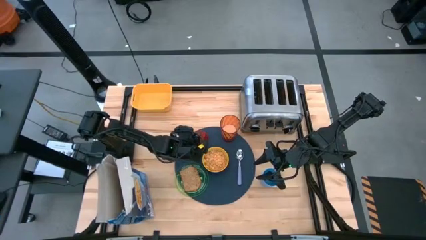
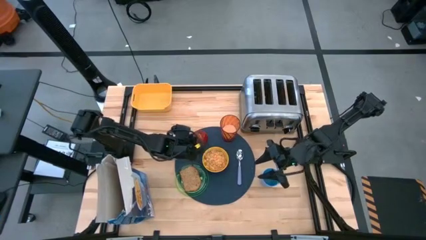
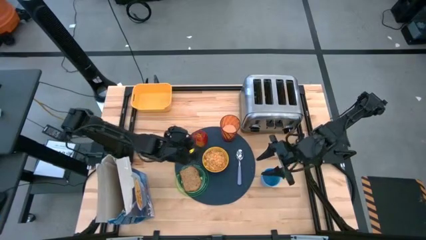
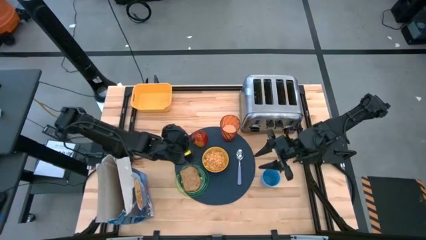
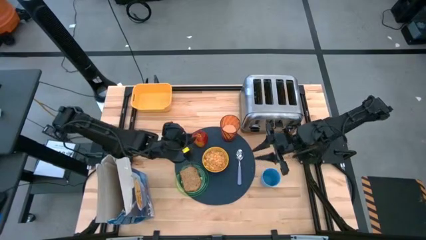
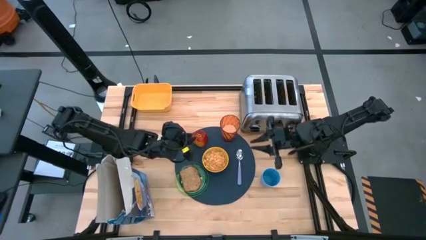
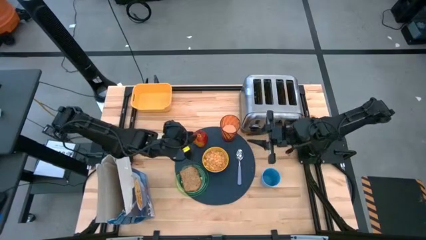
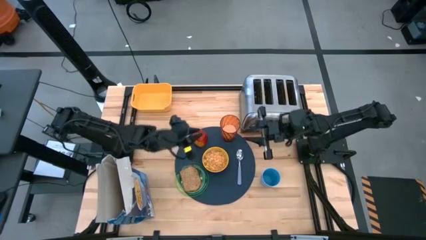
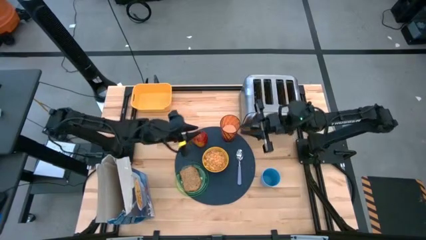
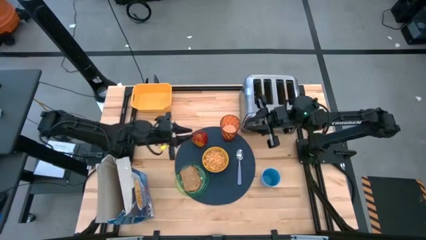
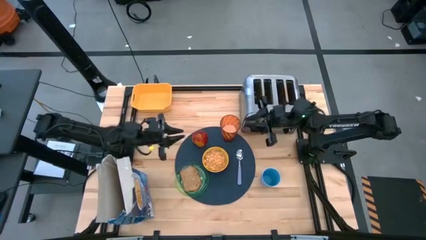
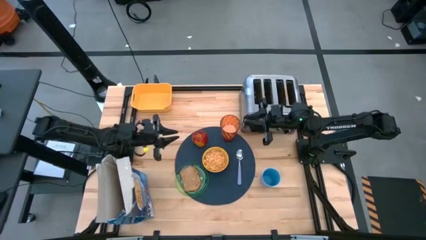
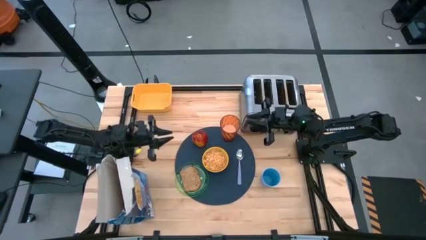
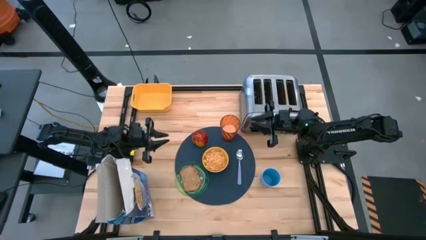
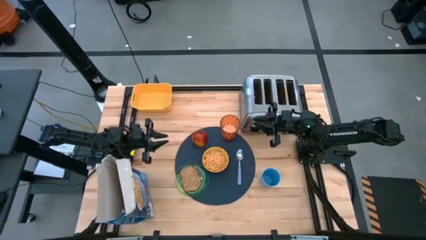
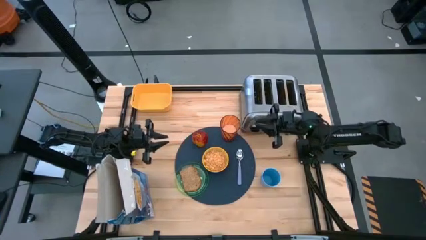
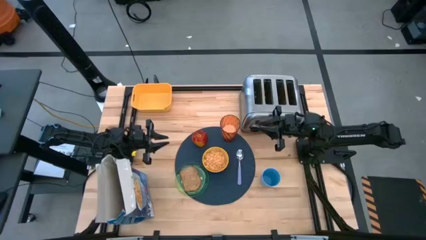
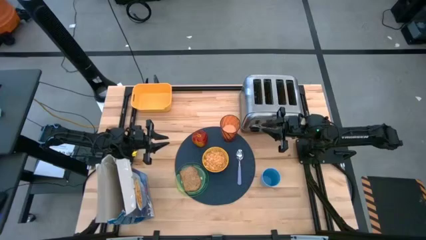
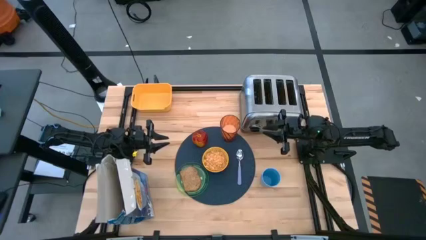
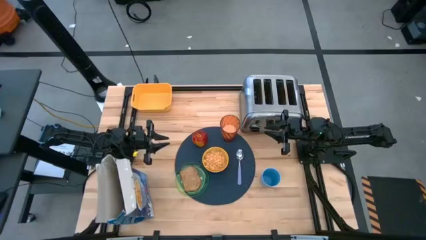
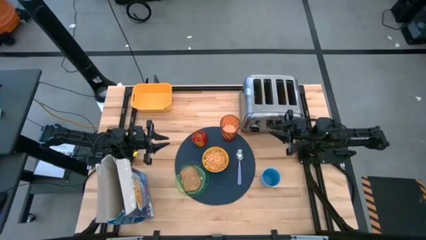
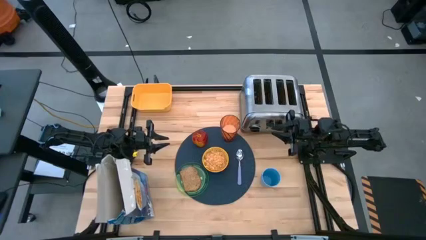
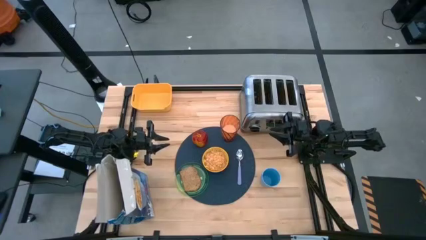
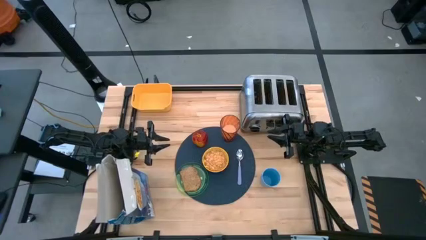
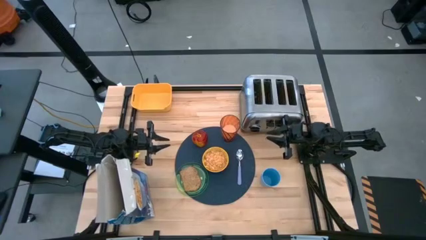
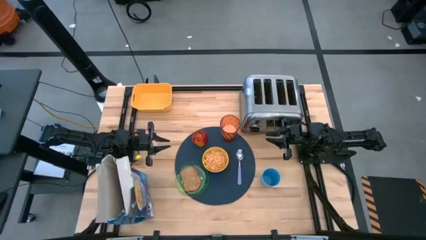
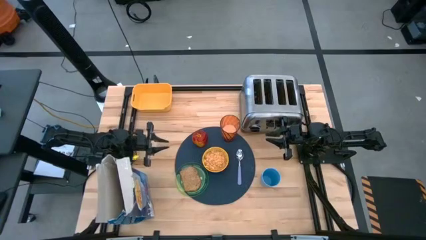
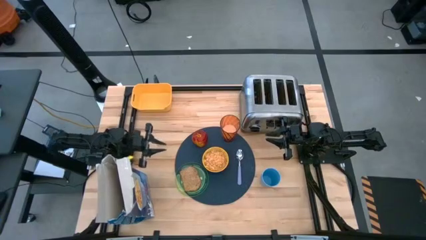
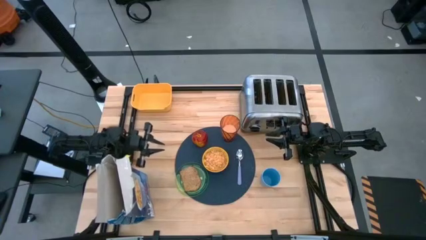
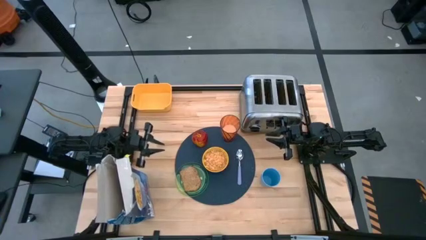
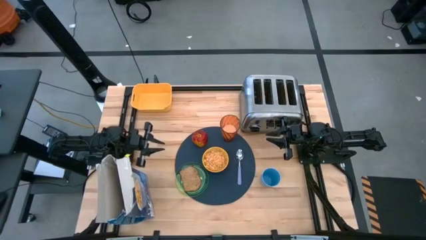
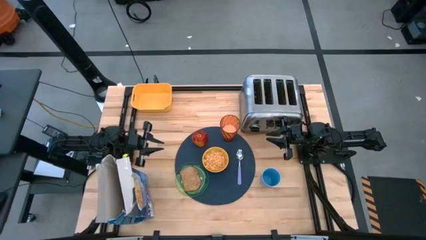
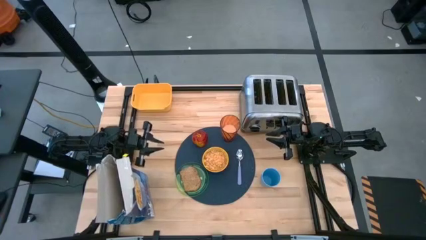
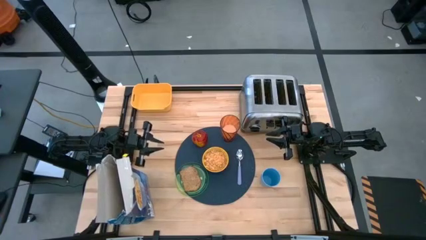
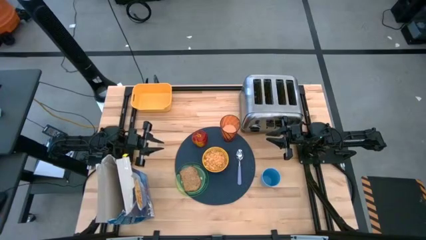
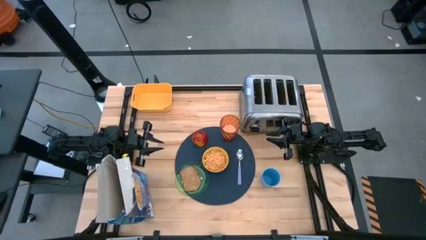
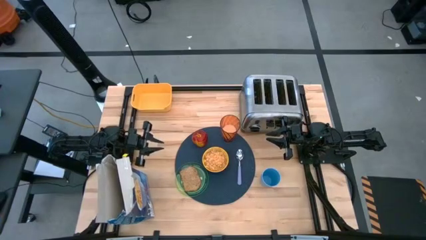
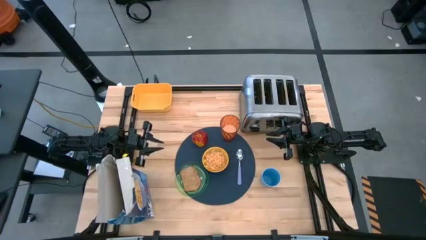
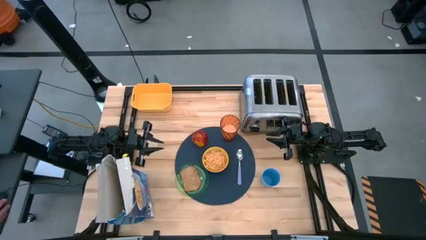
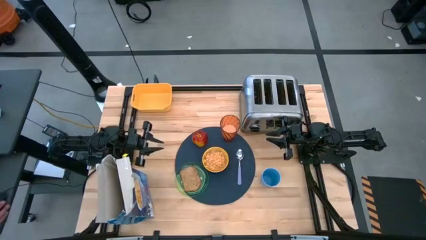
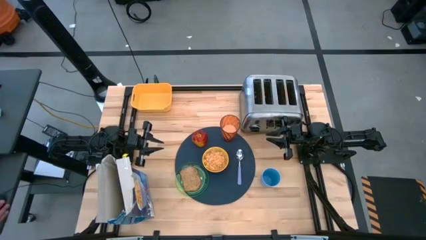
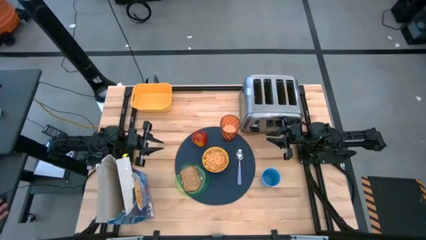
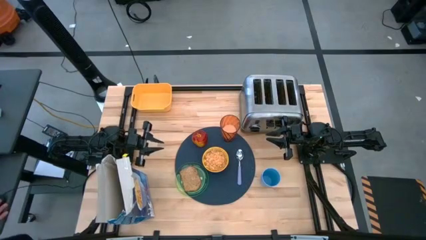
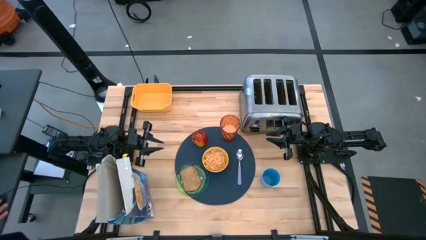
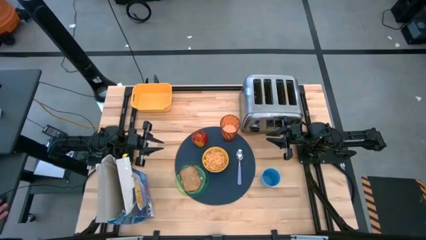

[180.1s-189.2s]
Task: Arrange a breakfast setting
Return to Home Position

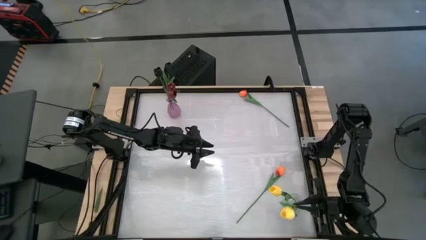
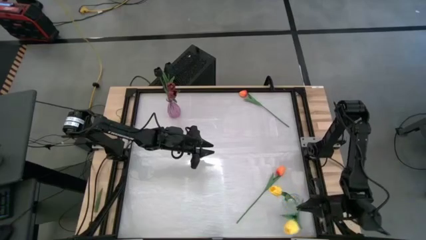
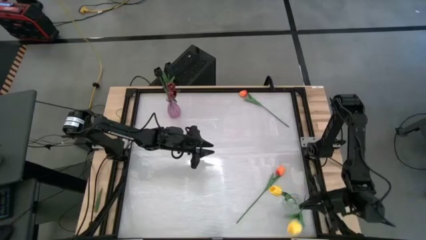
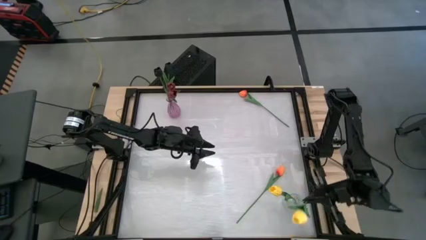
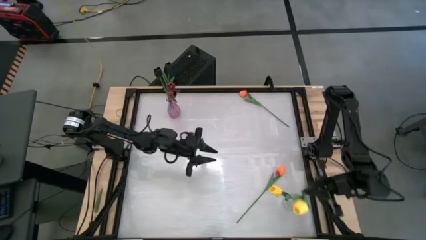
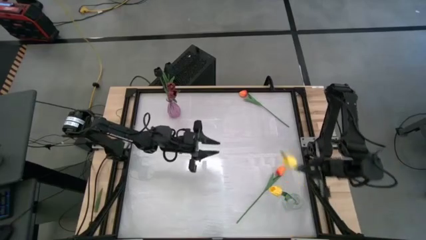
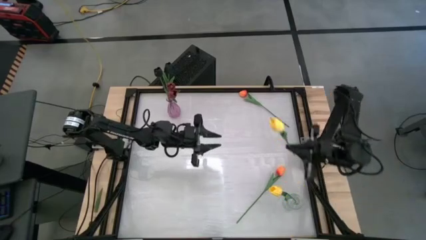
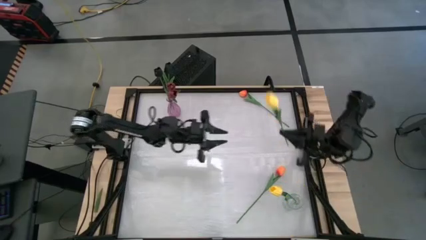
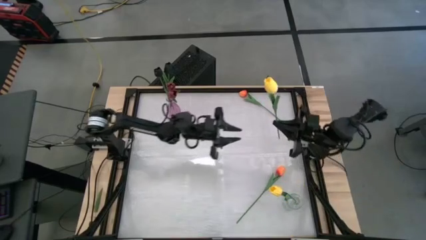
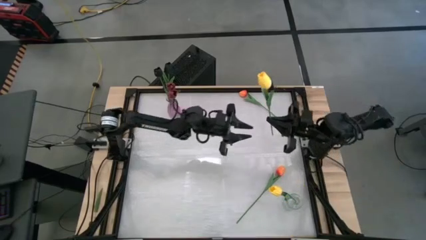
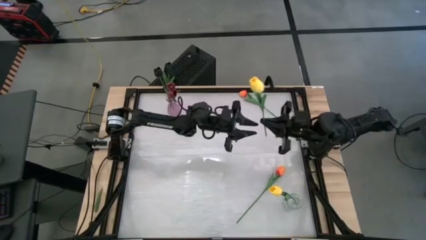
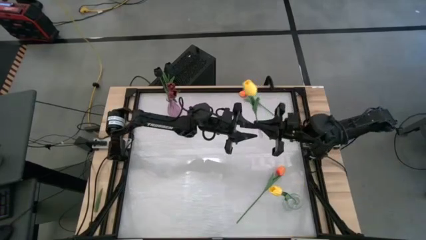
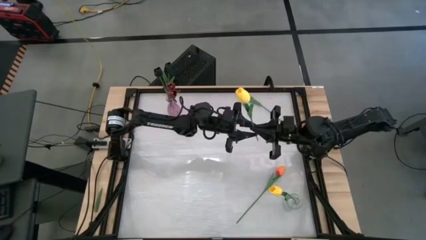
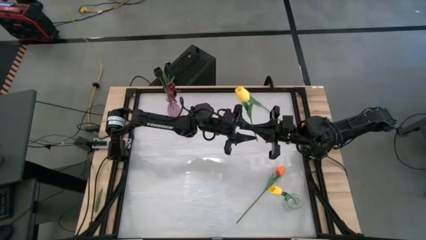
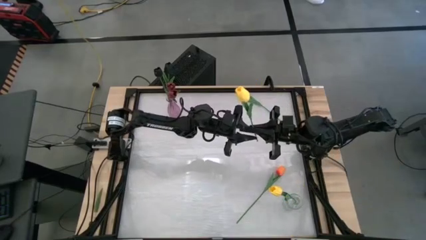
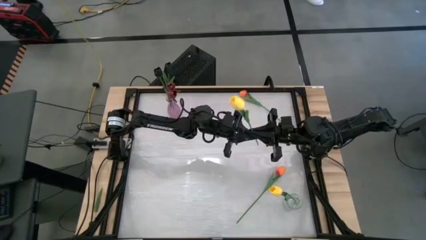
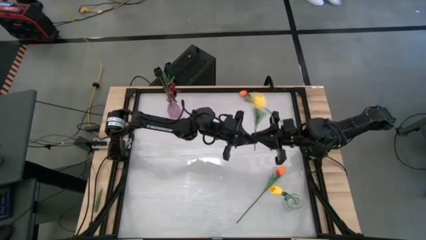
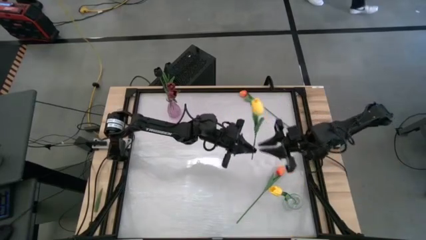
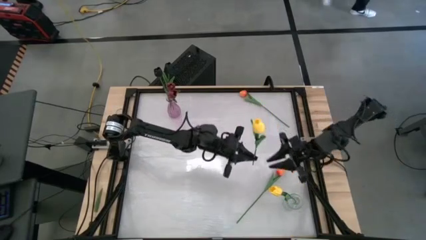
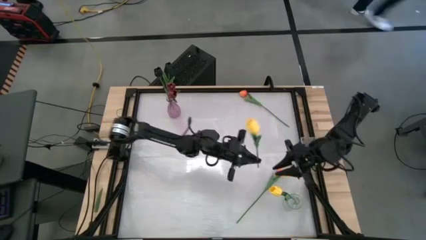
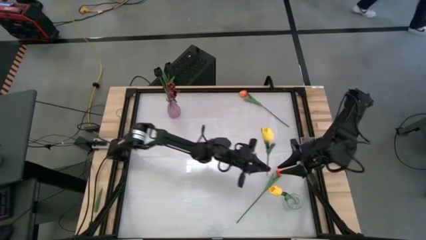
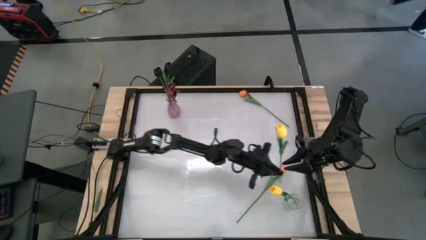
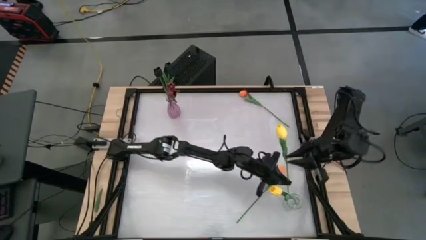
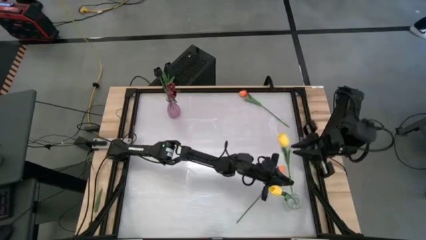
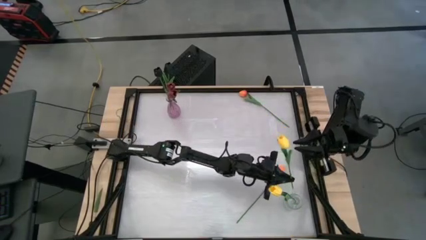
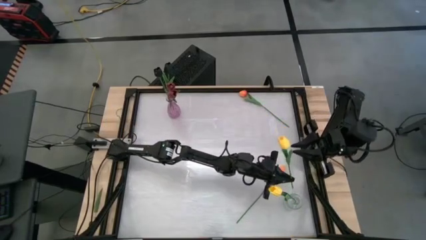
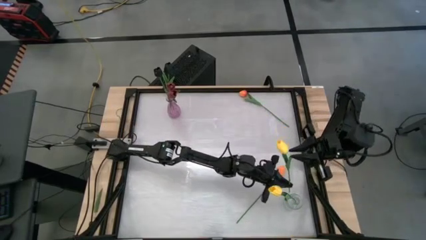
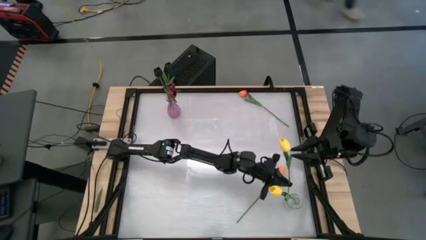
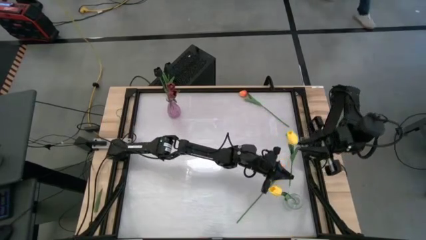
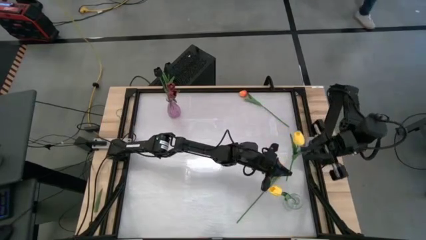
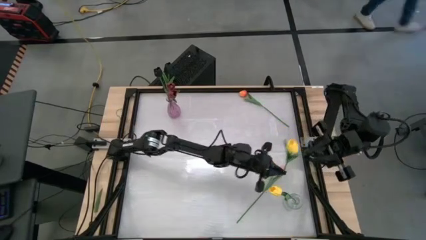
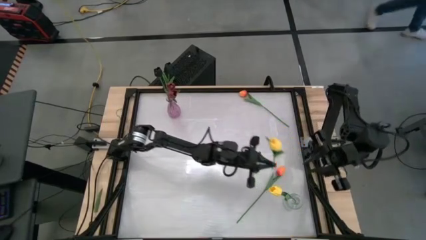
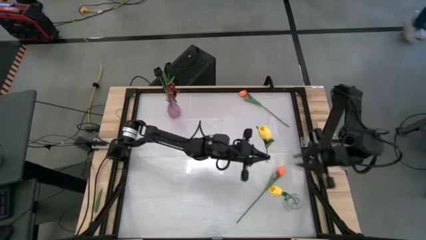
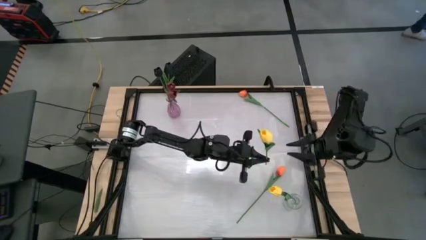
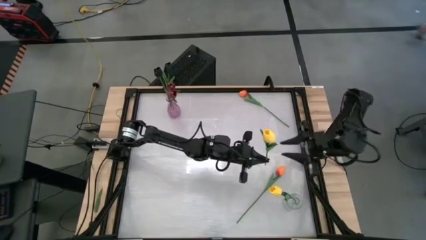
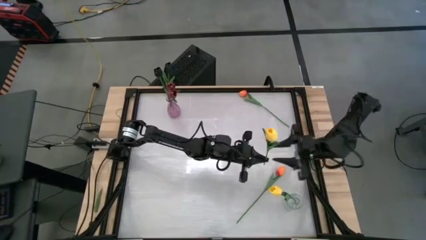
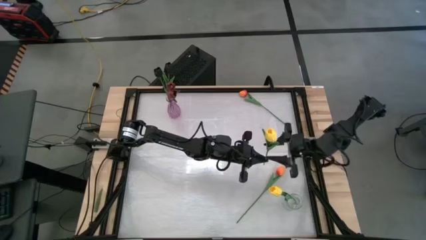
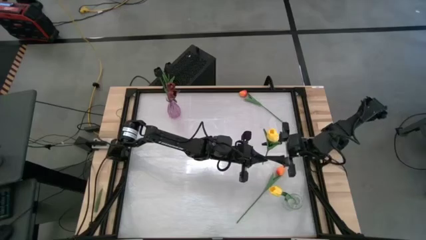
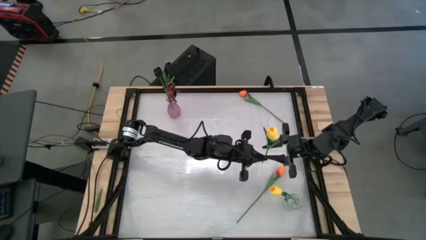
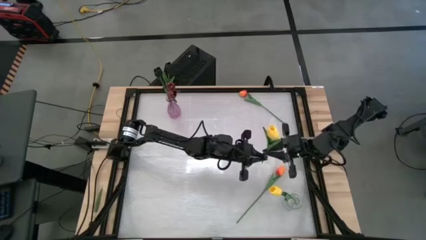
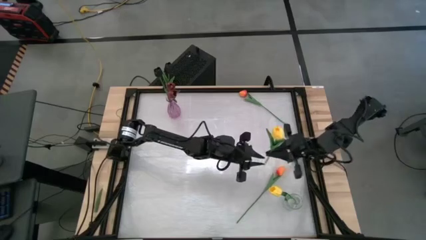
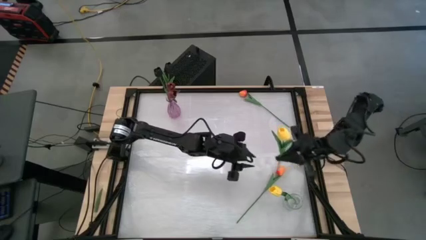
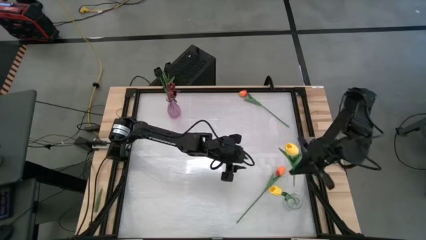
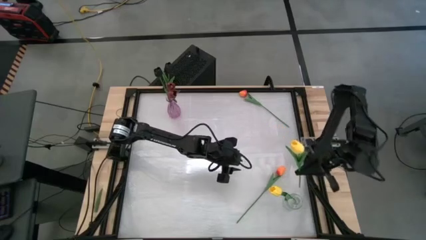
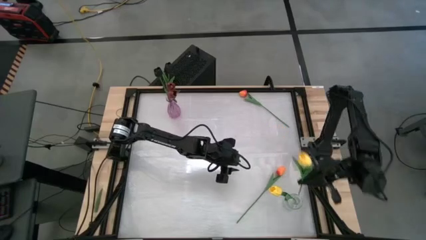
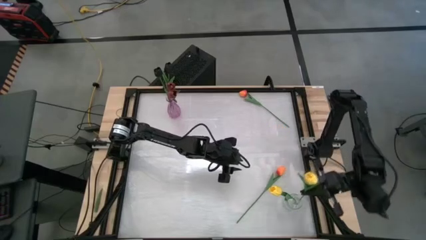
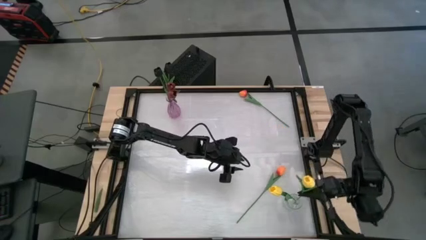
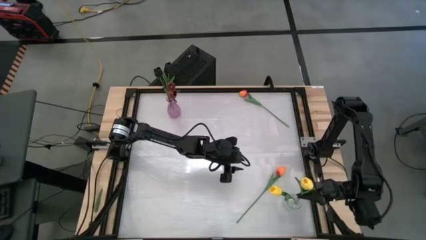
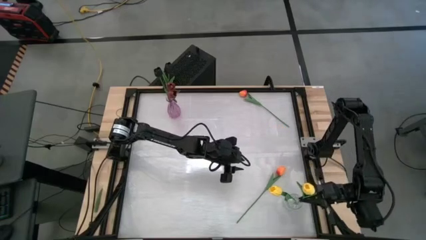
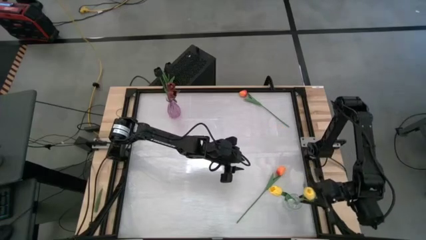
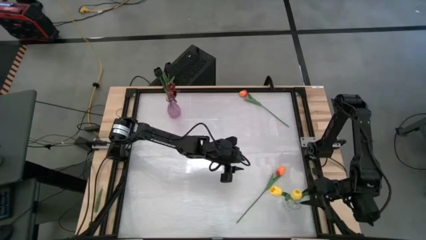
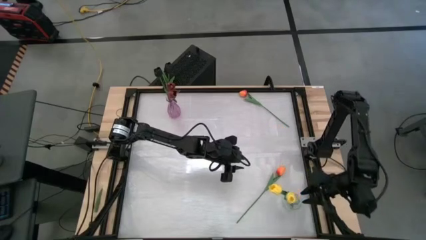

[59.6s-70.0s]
Task: Sort flowers into vase by color
Put the yellow flower into the transparent vase
